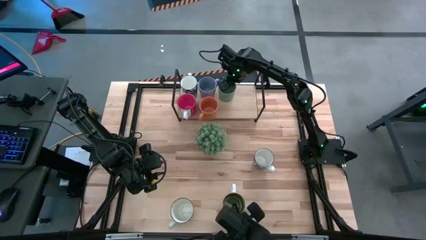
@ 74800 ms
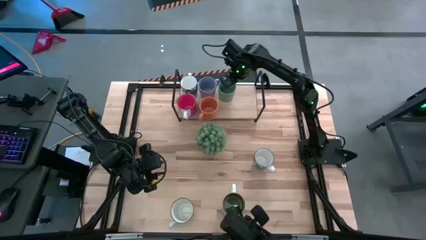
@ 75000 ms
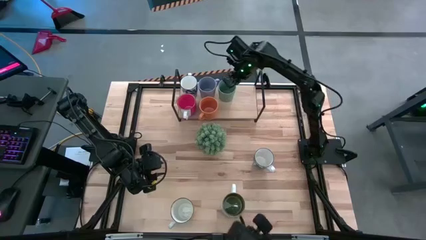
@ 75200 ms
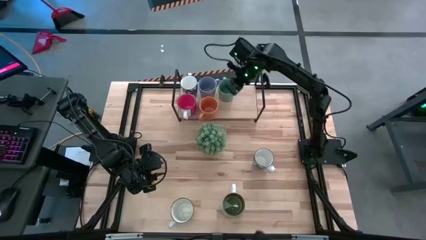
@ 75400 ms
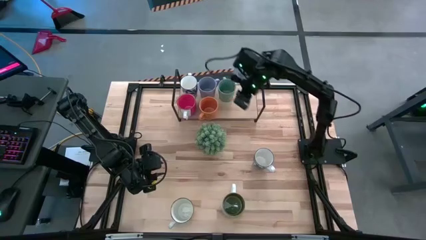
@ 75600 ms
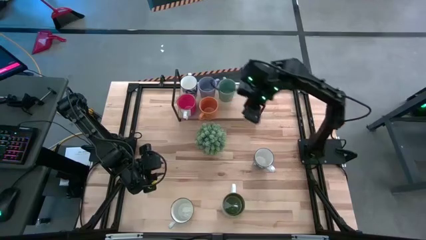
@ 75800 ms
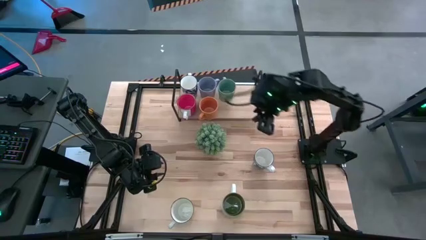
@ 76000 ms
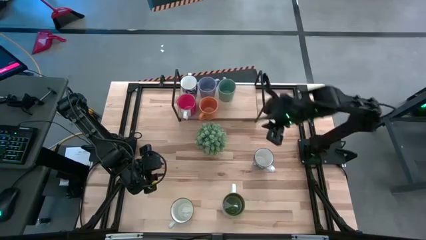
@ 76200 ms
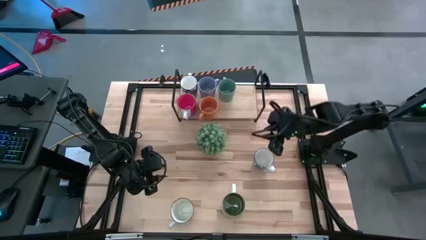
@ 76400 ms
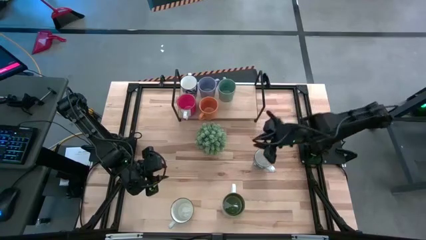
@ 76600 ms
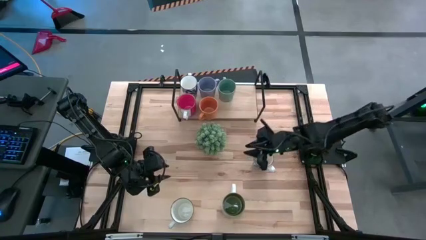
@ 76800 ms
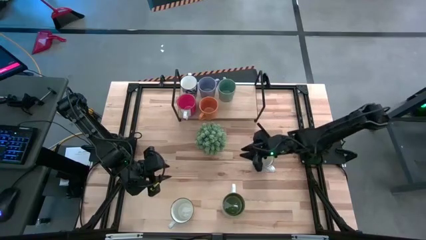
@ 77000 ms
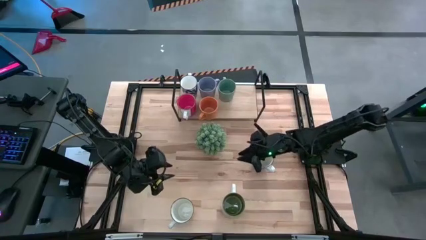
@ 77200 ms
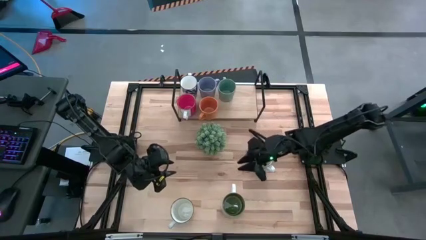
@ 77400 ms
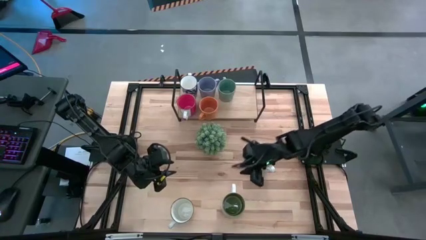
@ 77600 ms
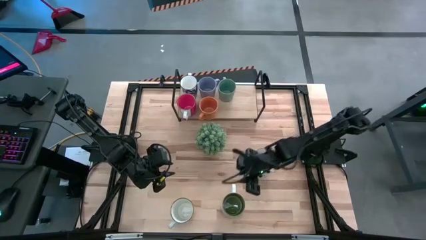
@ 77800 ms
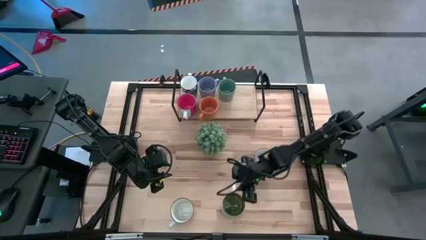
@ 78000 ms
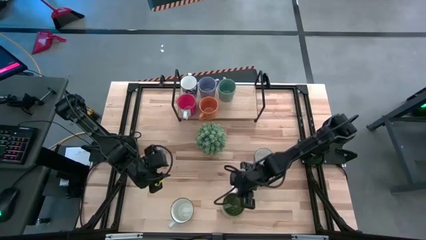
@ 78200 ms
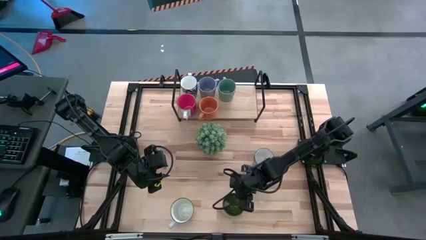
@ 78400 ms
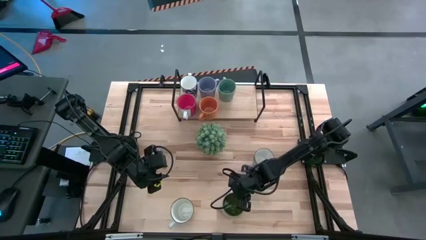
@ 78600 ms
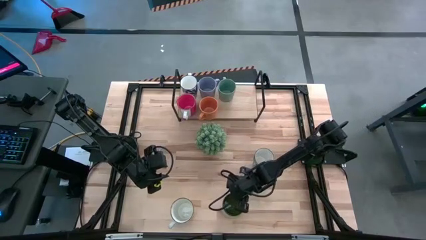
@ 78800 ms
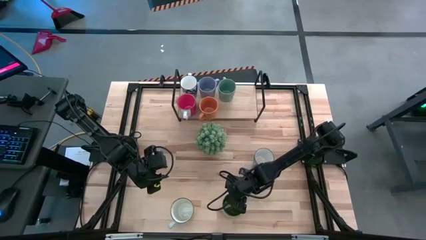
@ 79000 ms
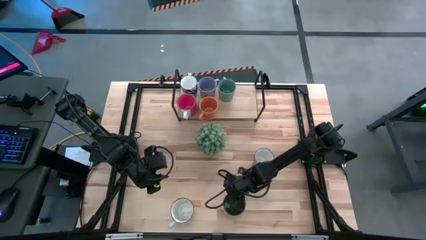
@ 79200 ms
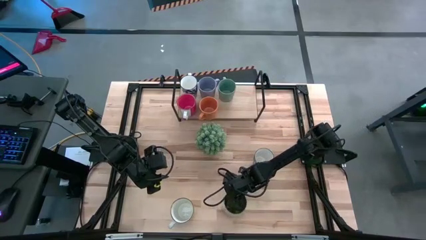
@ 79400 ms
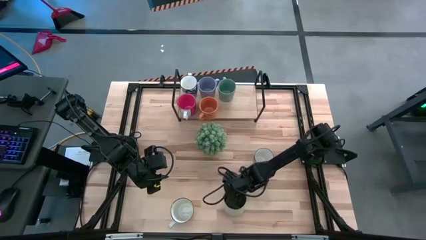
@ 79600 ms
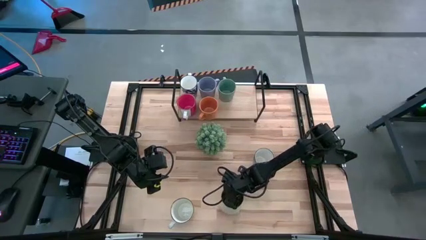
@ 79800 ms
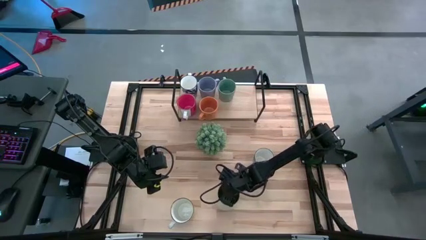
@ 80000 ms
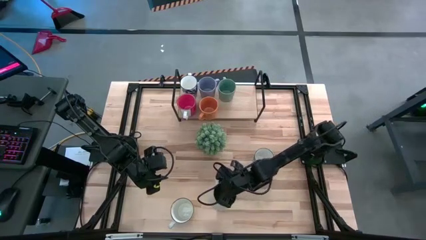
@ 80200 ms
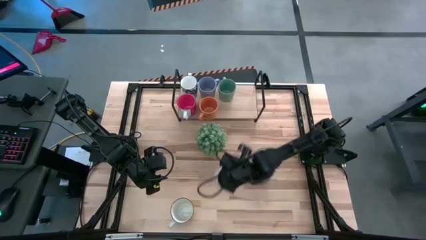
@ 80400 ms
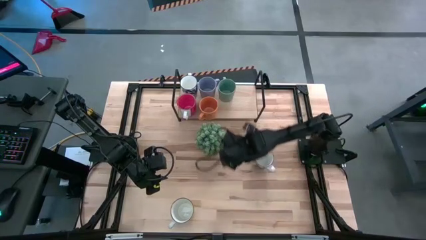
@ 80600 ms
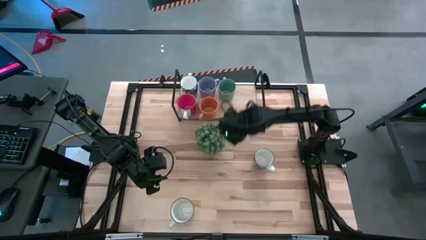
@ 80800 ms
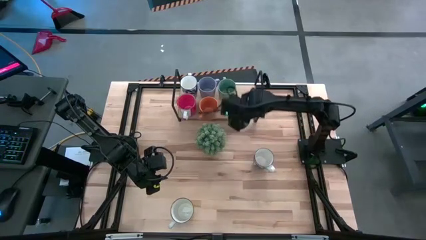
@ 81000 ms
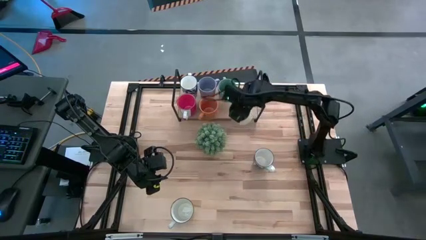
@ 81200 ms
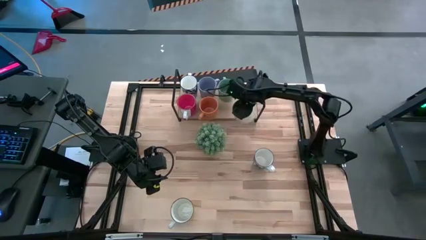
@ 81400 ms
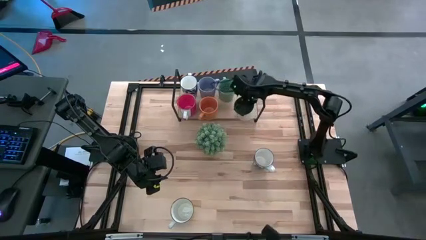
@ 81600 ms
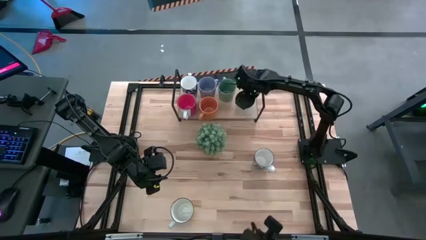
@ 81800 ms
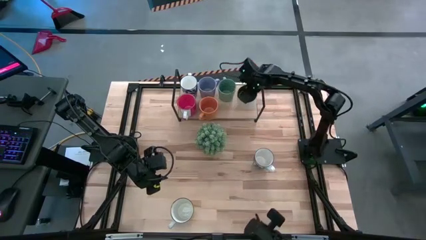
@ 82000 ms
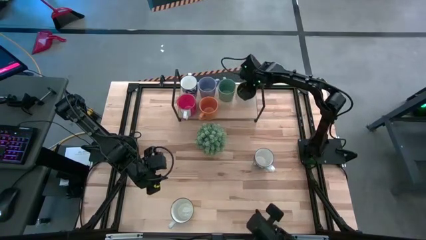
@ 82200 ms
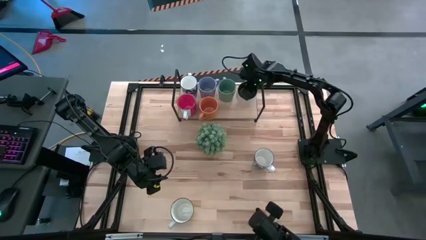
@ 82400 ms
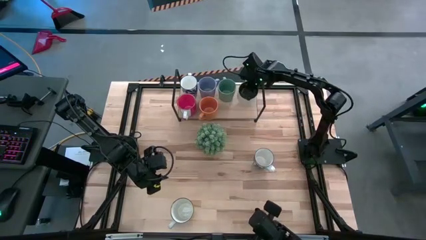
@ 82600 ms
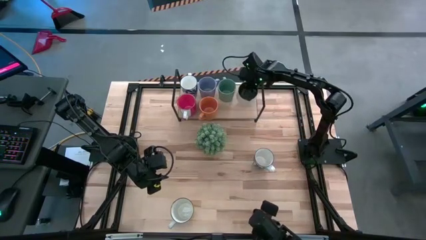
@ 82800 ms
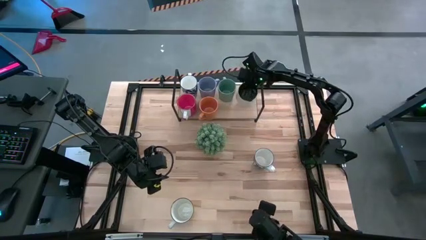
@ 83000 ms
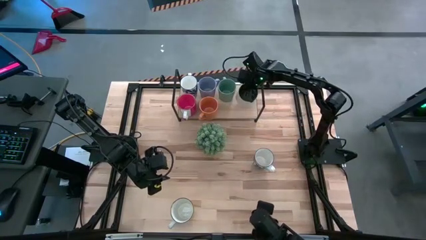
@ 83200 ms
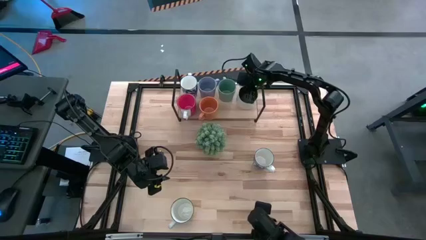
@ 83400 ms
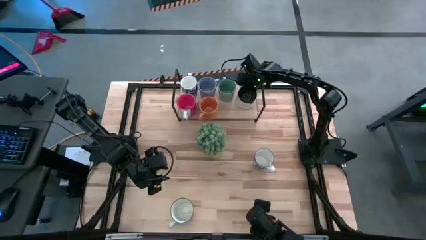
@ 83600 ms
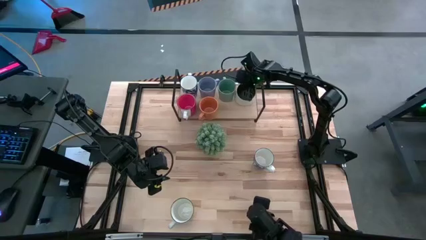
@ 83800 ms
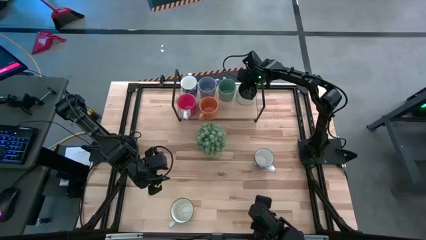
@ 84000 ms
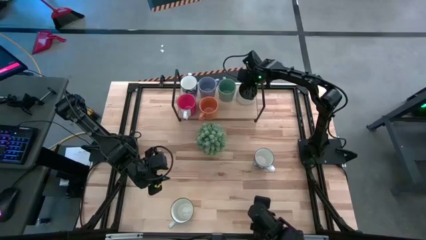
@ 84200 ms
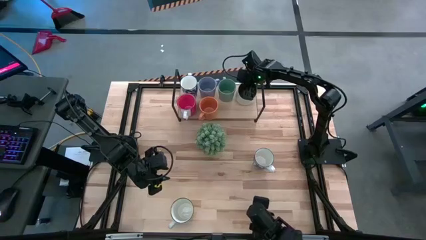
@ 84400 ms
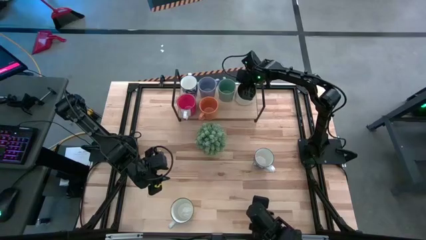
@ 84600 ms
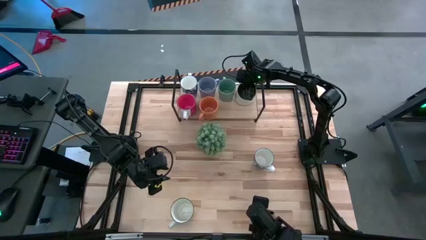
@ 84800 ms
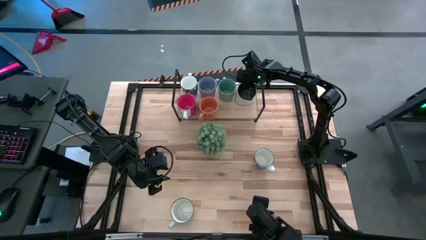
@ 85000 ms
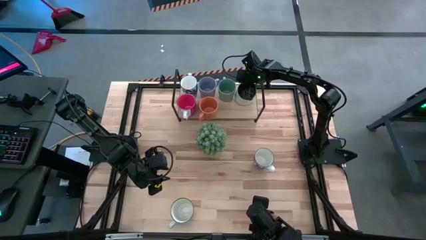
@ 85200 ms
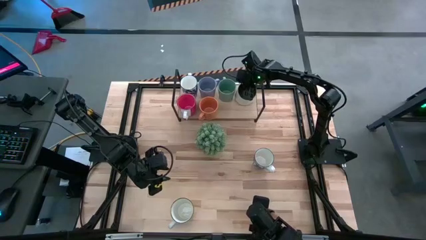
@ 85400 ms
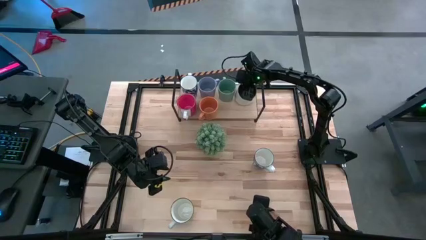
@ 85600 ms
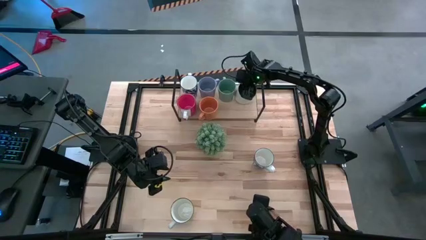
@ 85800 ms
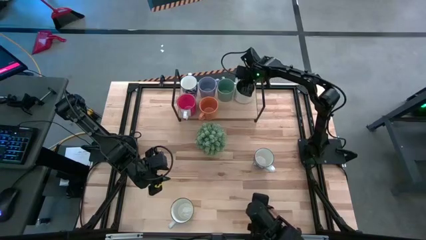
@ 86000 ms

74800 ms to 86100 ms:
Task: Place coffee mugs
Put the green mug on the shelf
